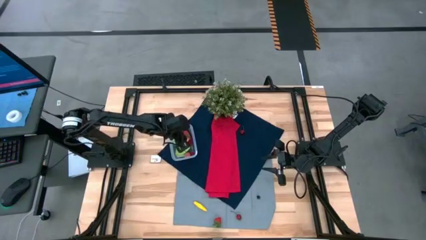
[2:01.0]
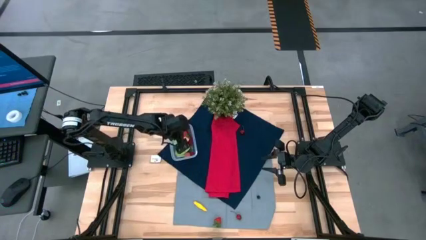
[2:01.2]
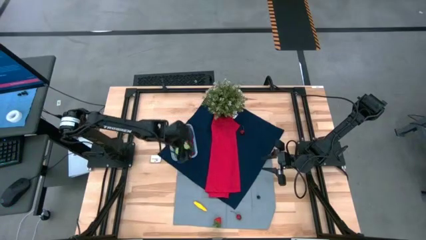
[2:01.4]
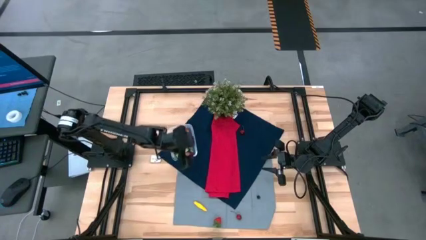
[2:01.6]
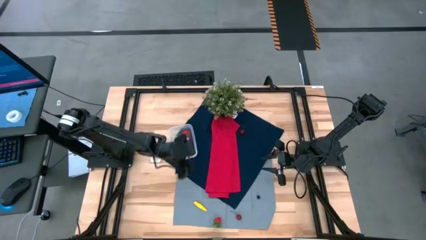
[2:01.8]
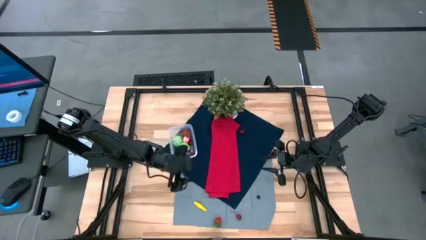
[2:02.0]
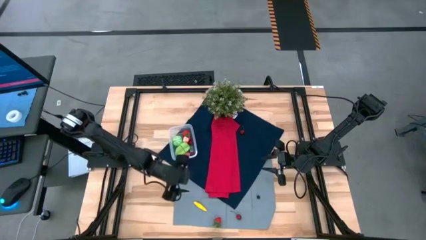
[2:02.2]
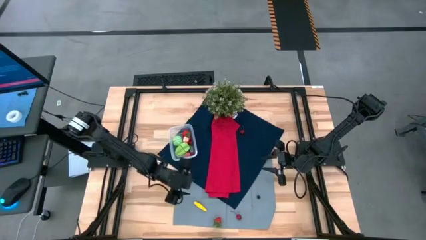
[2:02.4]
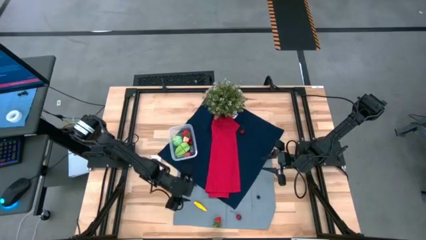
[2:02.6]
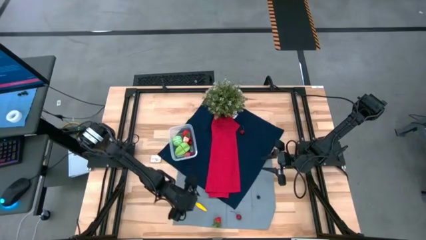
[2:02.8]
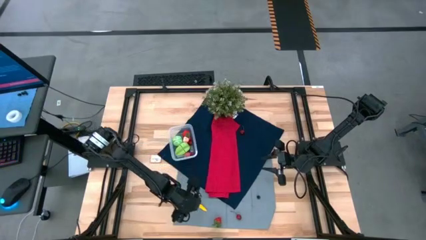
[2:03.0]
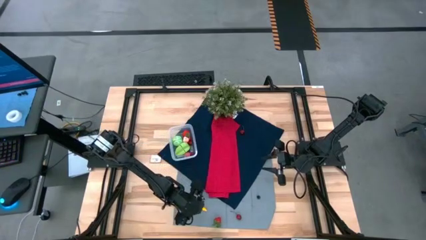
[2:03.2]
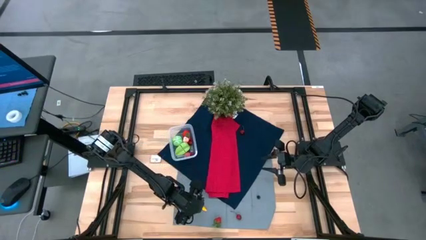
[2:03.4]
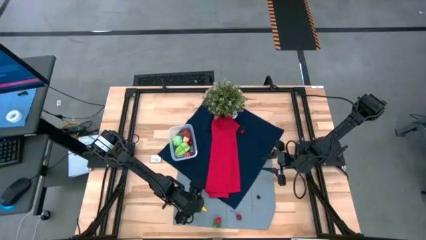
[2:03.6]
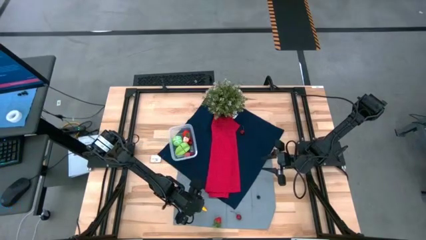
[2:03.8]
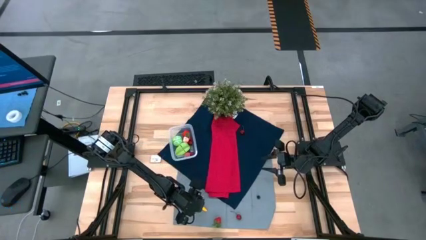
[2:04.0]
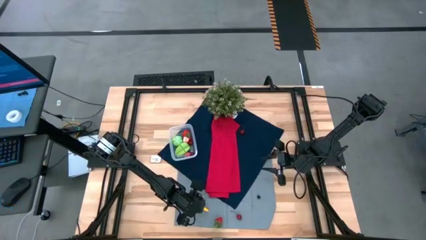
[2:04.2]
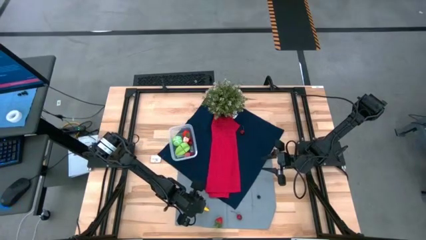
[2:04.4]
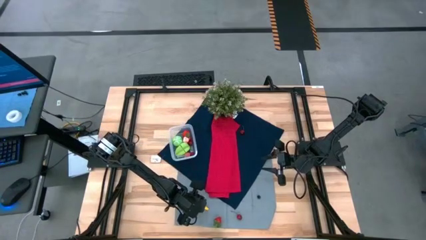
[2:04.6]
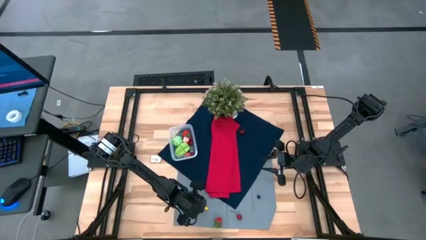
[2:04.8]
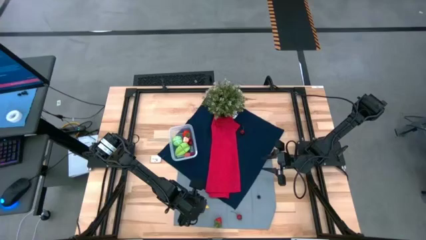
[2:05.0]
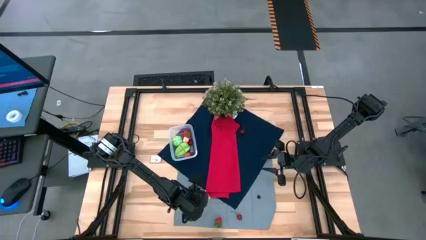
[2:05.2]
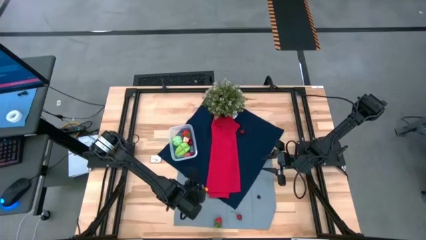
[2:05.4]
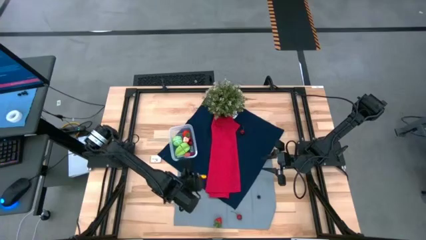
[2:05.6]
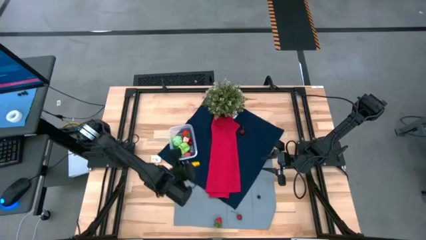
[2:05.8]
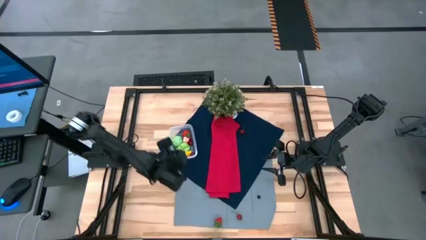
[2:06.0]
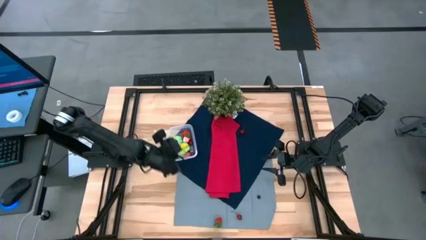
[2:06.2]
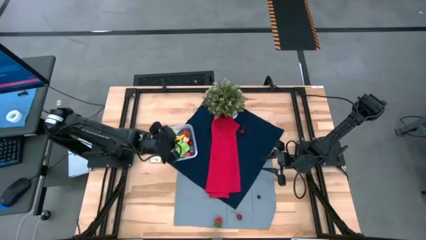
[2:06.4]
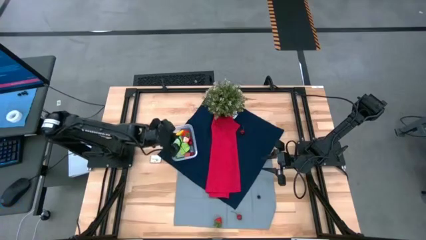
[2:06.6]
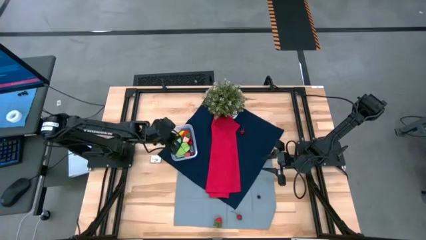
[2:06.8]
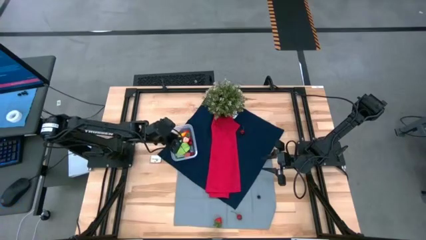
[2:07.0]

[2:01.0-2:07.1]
Task: Pick and placing Produce into tupperware
Put the yellow corn into the transparent bin

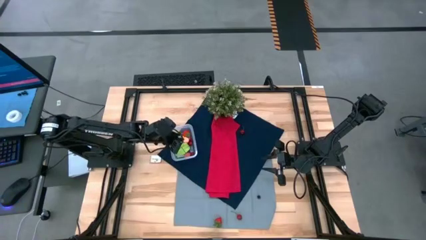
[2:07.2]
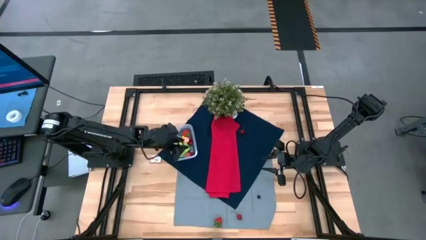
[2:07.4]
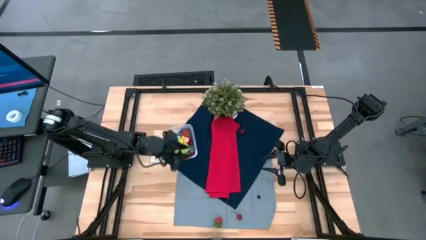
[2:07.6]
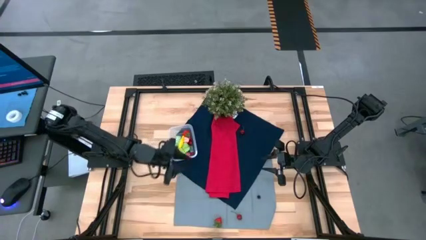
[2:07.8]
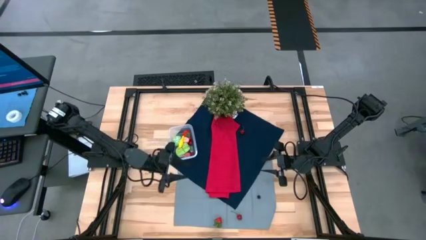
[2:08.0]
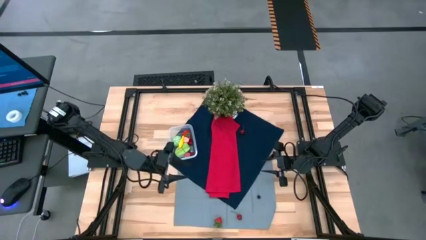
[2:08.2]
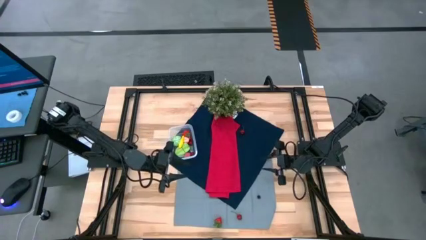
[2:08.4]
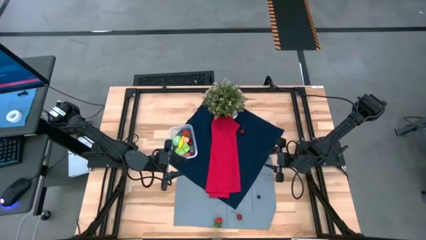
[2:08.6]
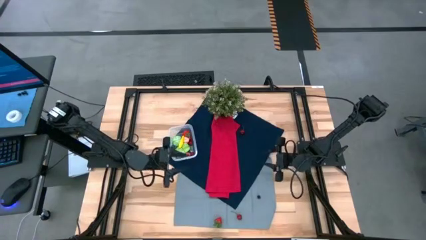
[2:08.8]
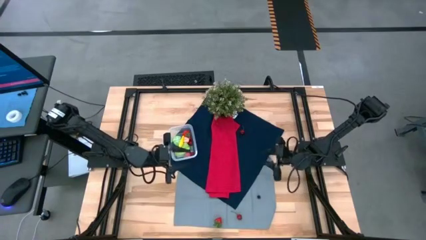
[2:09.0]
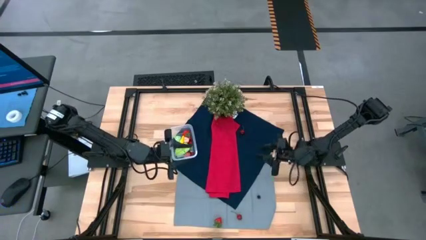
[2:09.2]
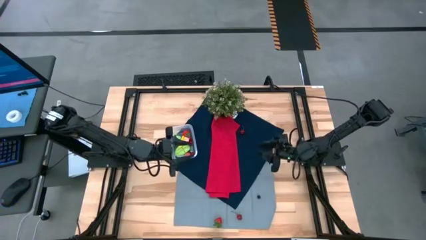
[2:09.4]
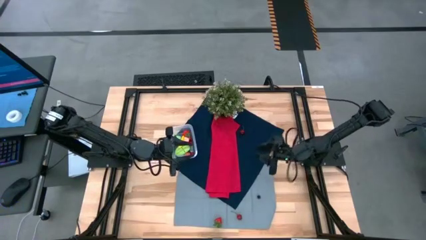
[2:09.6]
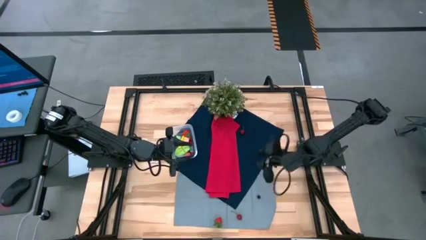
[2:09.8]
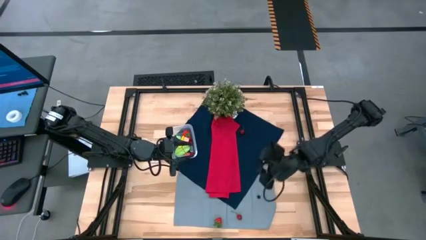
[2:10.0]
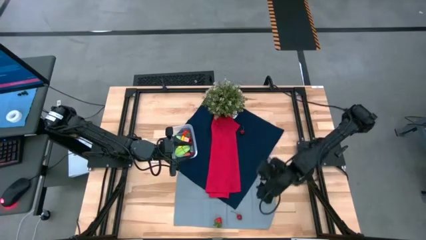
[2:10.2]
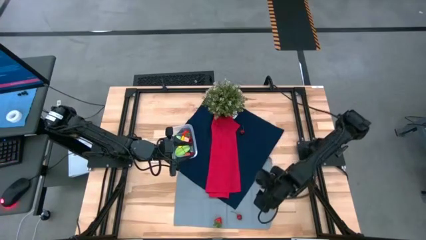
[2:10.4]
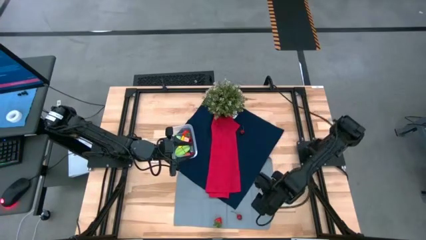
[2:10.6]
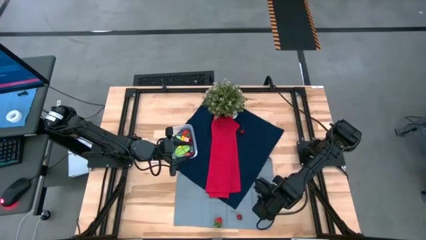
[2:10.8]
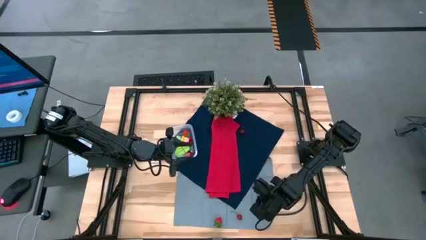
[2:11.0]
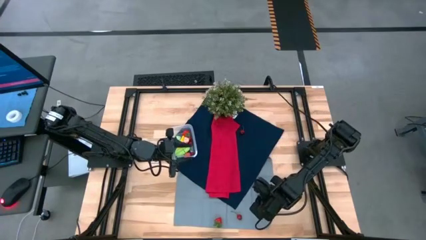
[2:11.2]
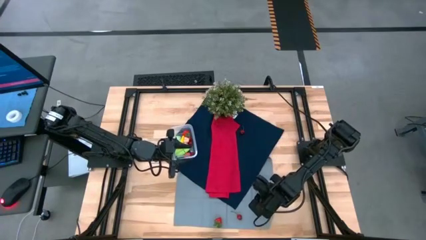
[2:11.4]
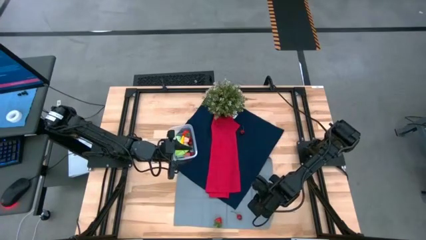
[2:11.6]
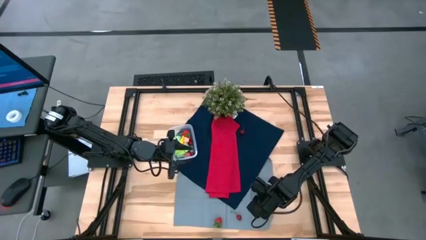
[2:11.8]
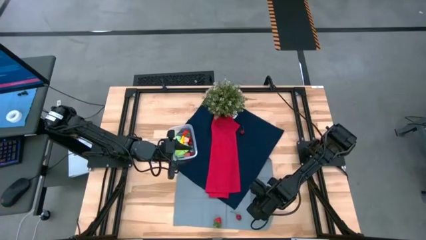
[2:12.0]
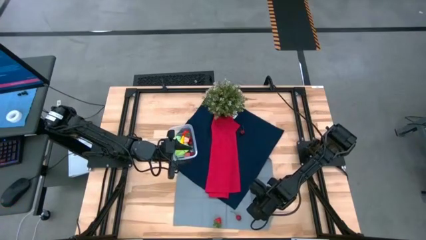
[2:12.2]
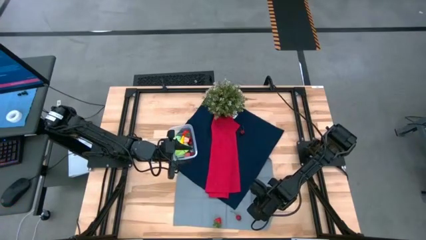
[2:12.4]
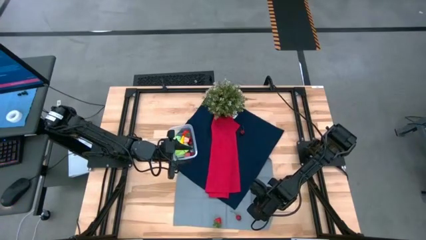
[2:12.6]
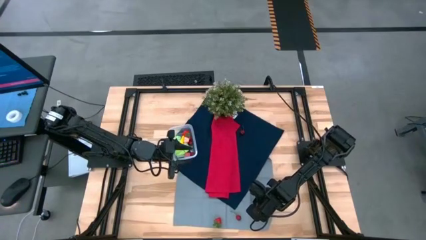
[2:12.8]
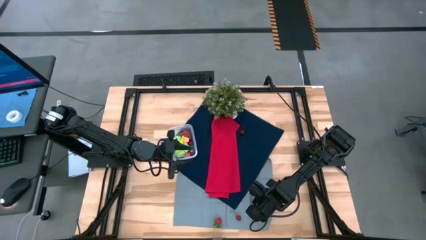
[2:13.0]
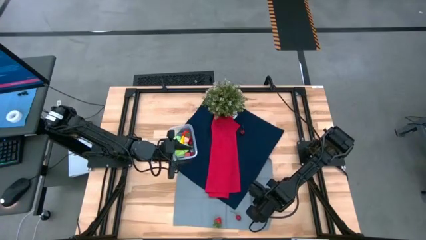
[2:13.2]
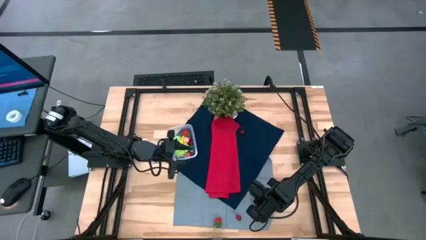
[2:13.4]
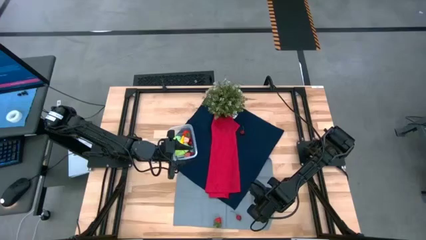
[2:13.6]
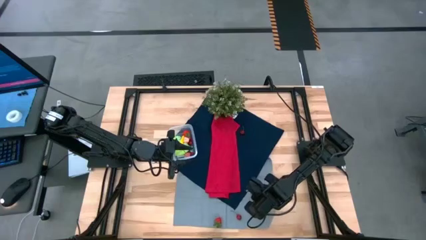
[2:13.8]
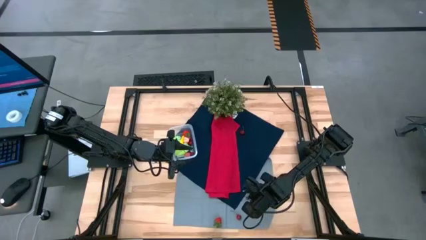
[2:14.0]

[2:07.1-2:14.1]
Put the blueberry into the transparent bin

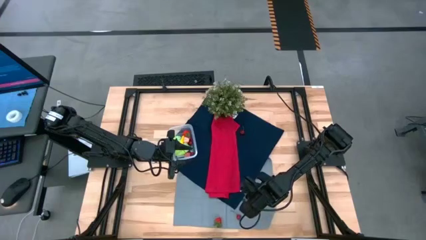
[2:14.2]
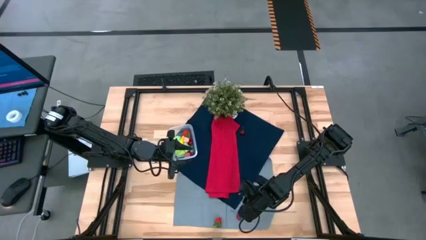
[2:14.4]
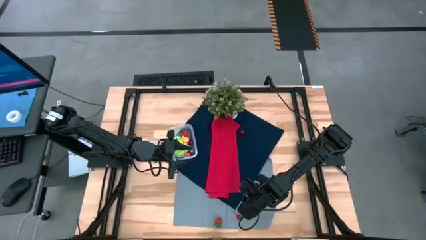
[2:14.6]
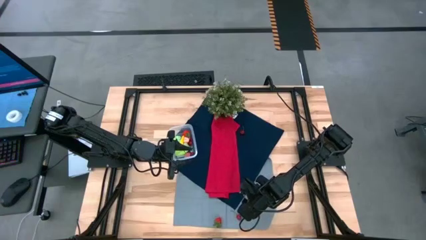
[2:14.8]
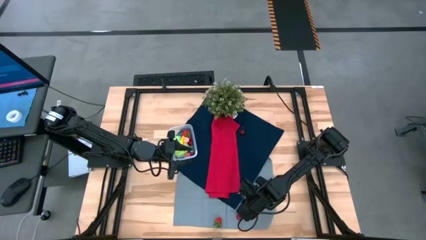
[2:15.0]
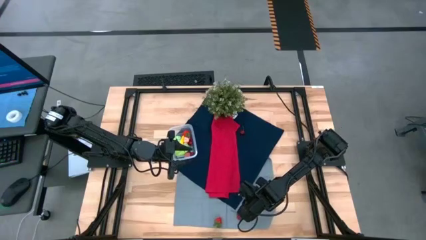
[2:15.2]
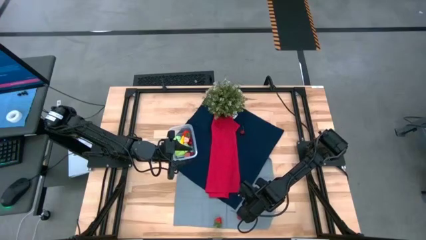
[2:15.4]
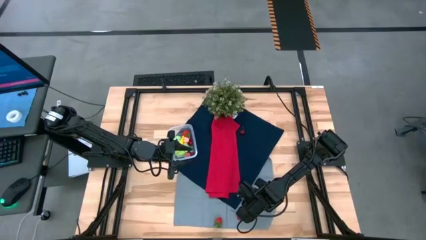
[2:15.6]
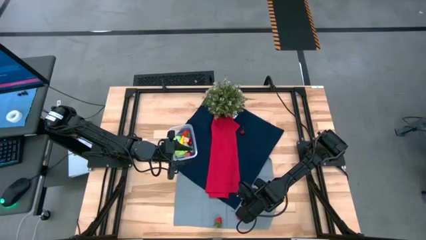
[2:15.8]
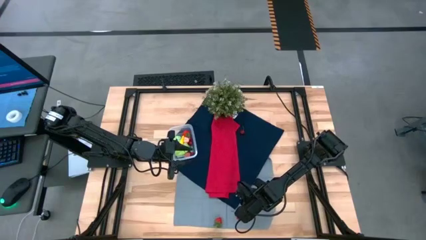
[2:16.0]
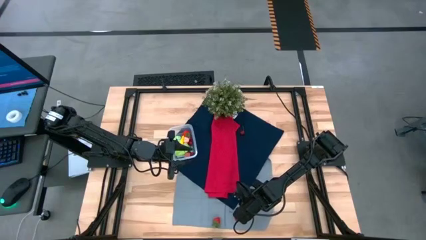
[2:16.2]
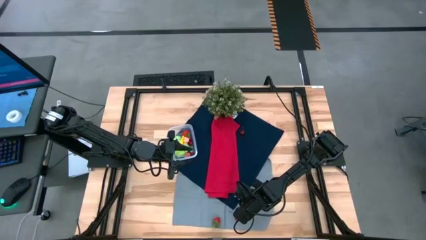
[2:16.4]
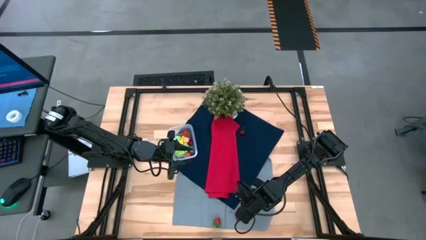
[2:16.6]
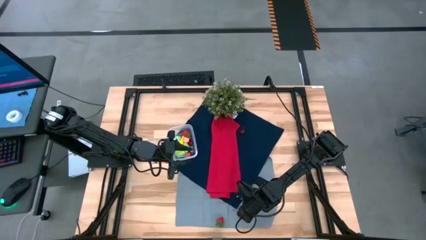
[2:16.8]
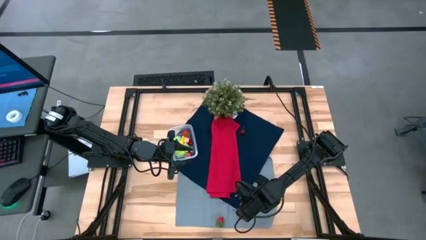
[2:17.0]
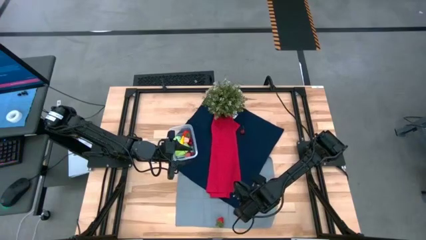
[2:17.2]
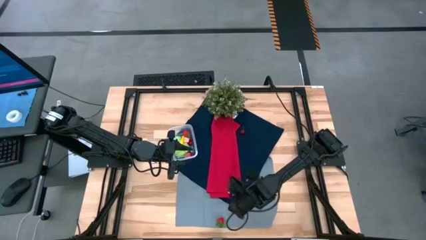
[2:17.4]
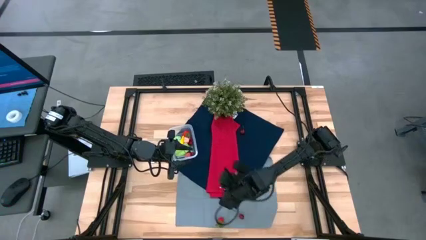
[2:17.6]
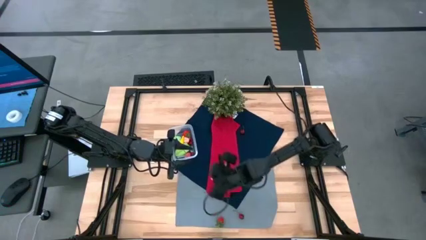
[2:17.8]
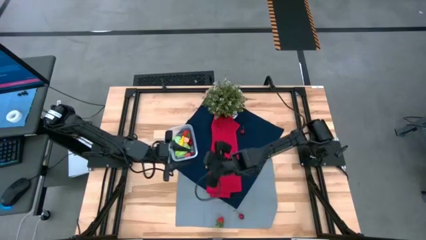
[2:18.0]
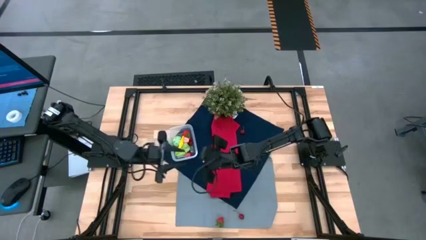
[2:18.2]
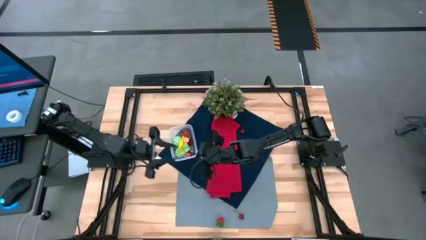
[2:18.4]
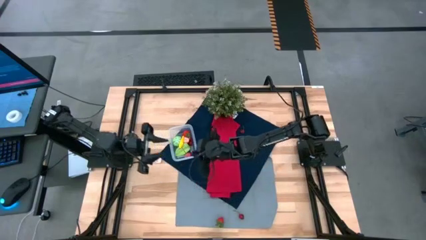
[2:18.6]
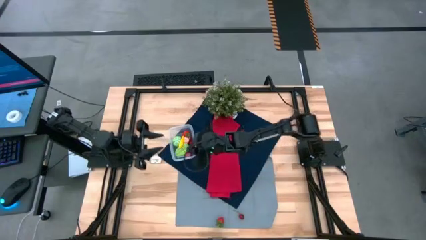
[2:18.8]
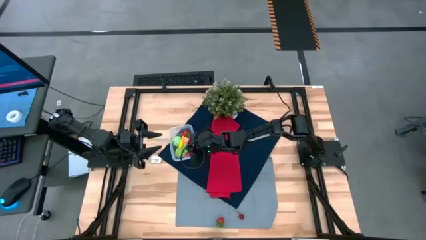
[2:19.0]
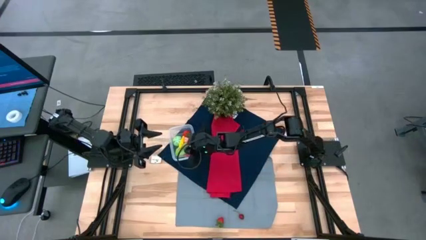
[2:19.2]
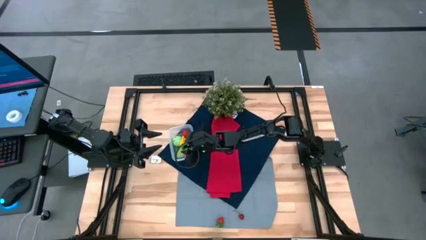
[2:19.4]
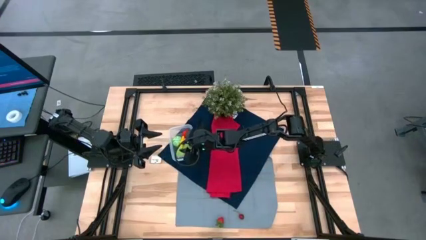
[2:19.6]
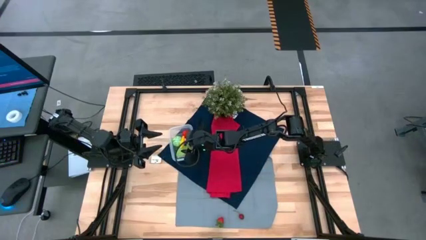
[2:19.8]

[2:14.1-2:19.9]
Put the blueberry into the transparent bin
